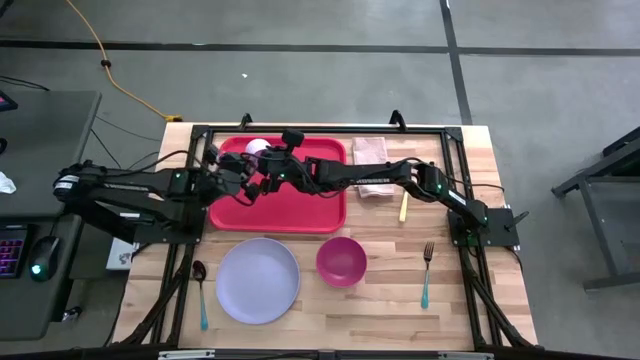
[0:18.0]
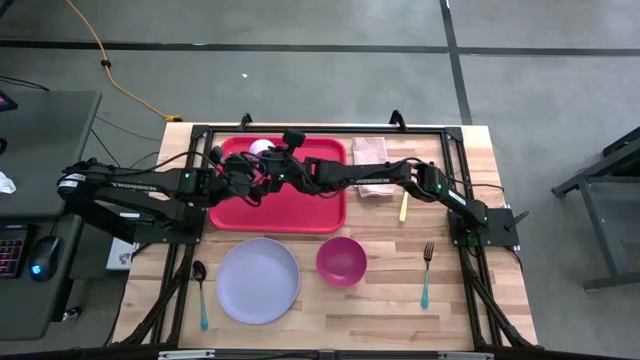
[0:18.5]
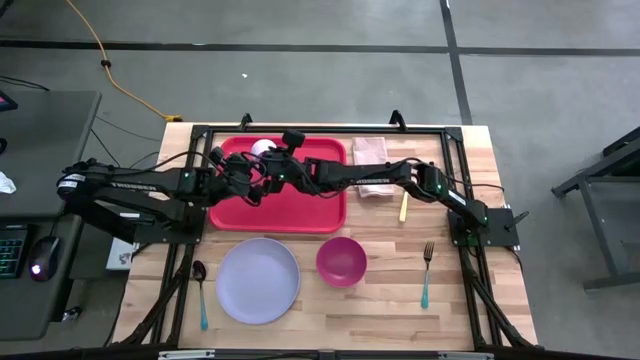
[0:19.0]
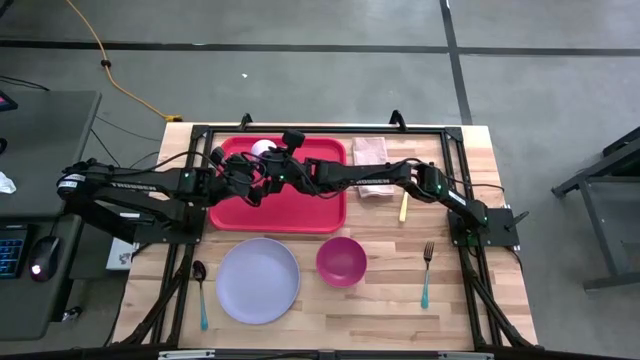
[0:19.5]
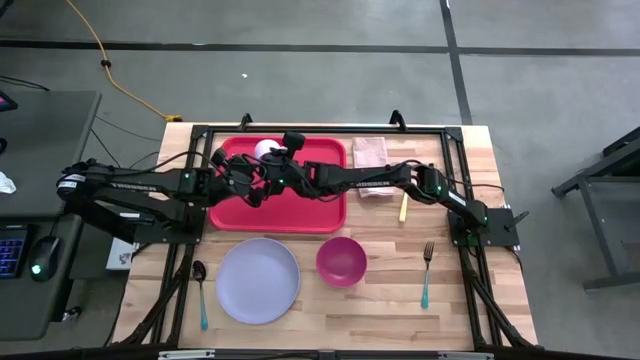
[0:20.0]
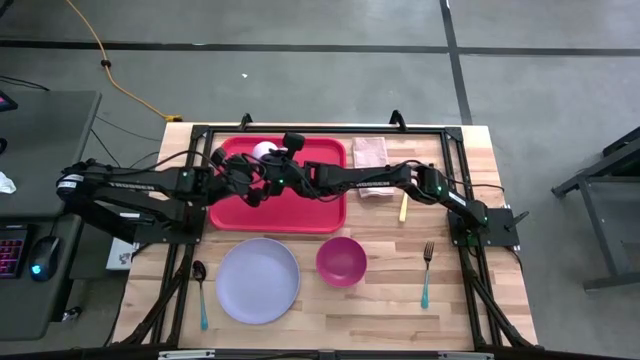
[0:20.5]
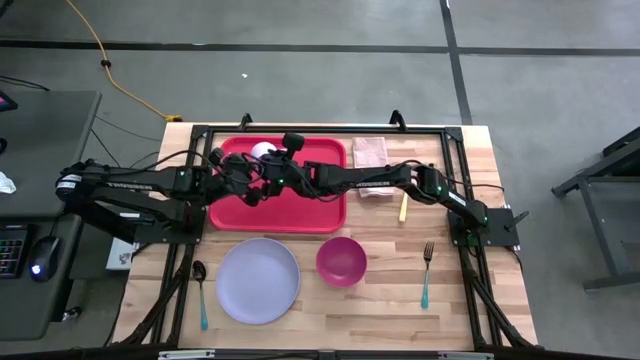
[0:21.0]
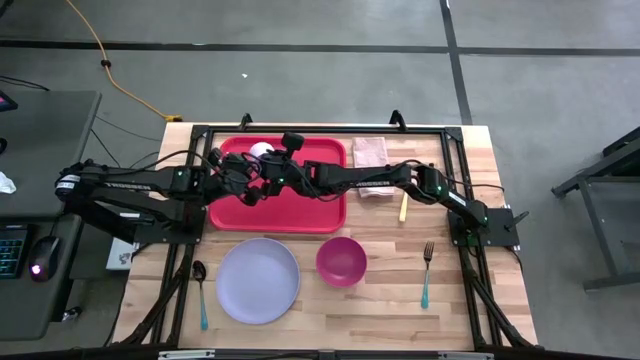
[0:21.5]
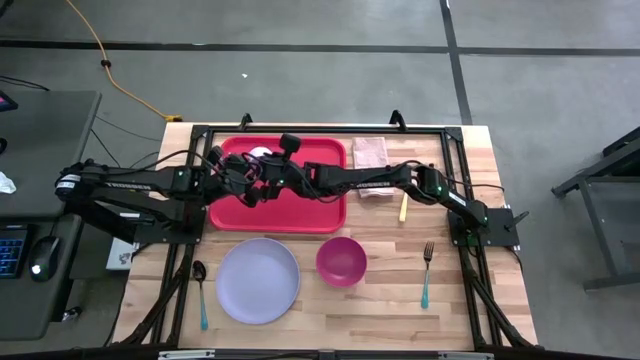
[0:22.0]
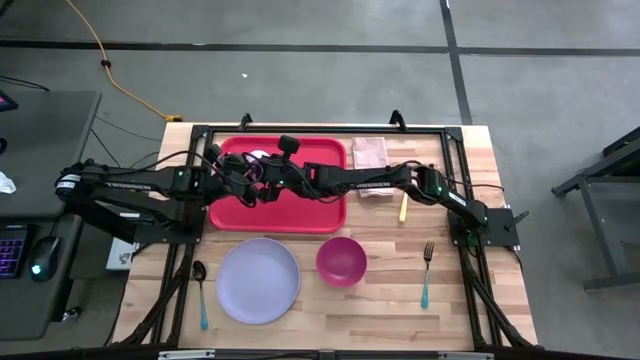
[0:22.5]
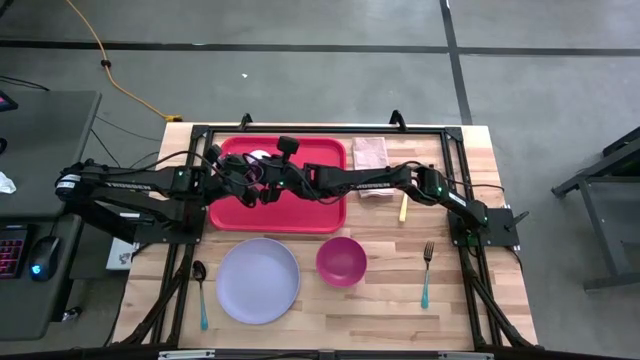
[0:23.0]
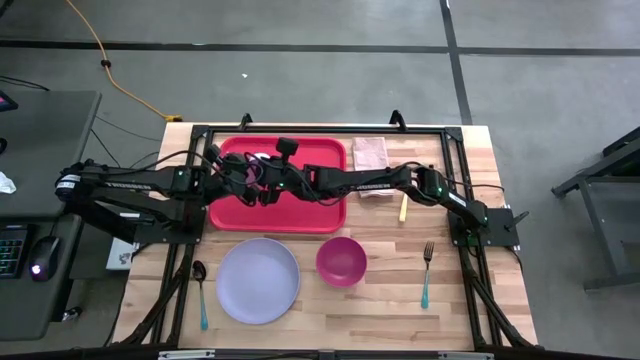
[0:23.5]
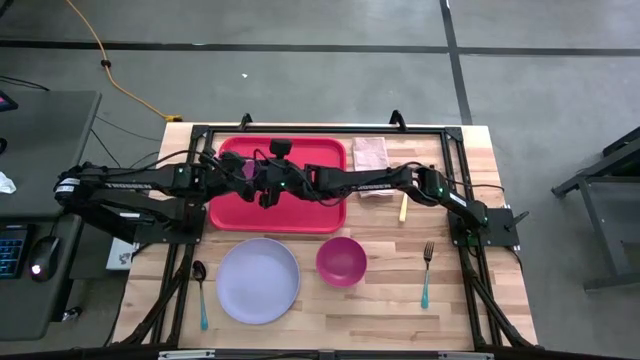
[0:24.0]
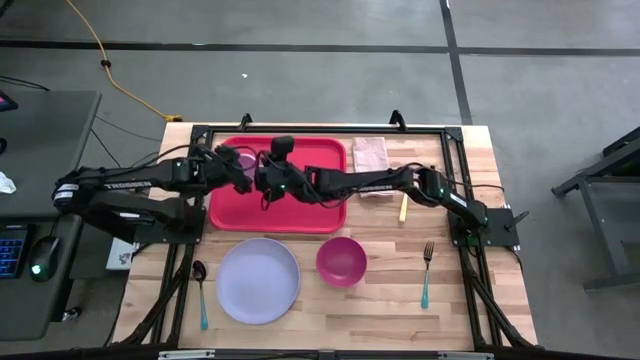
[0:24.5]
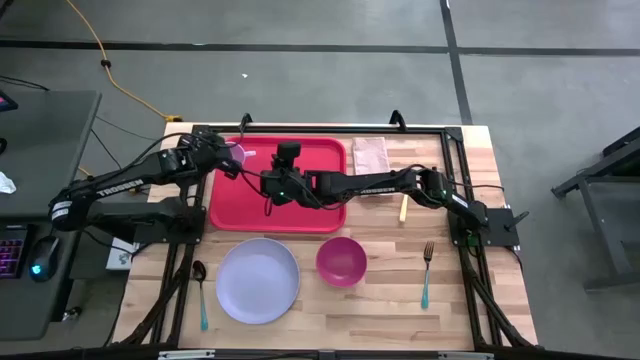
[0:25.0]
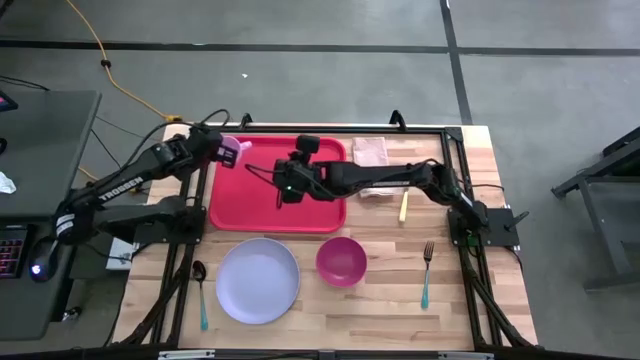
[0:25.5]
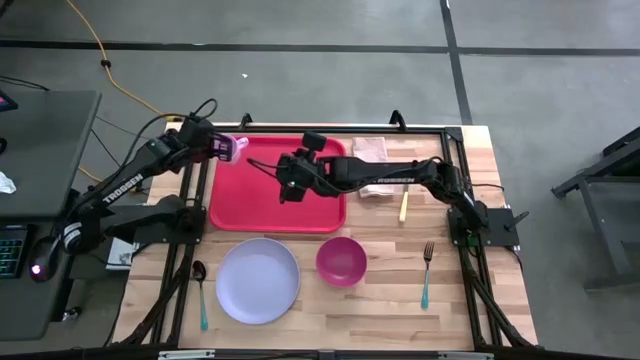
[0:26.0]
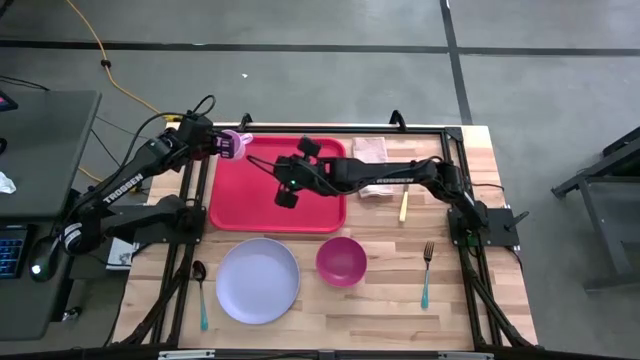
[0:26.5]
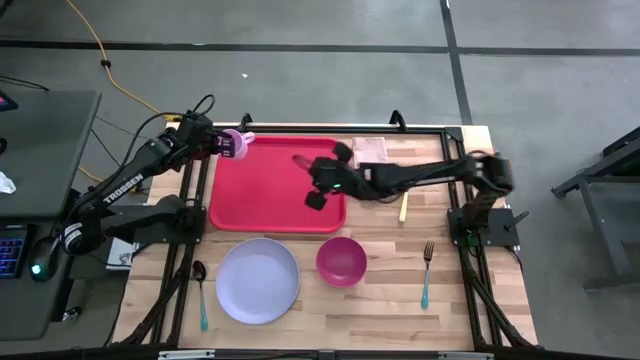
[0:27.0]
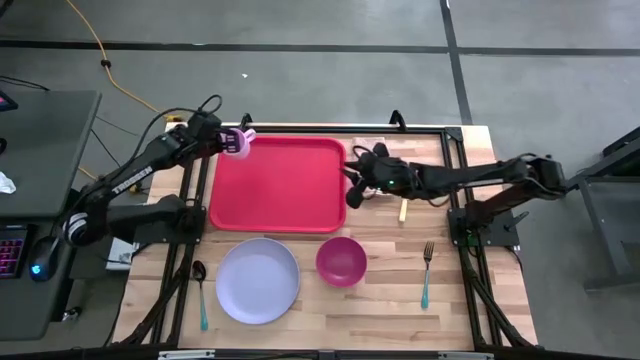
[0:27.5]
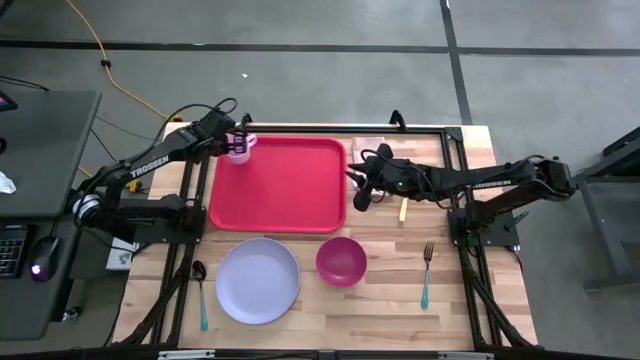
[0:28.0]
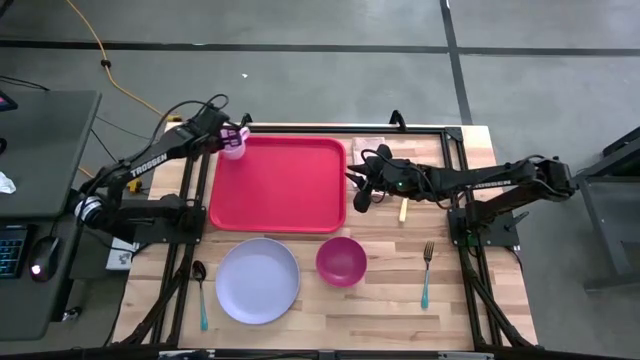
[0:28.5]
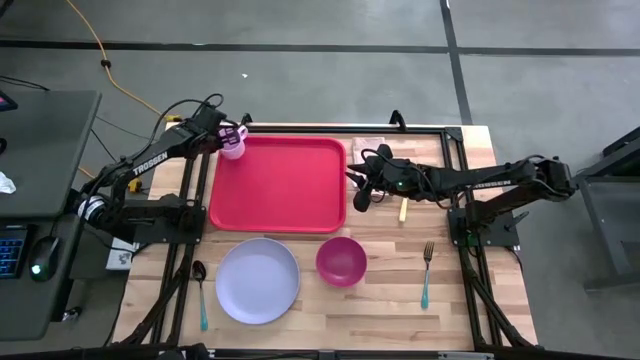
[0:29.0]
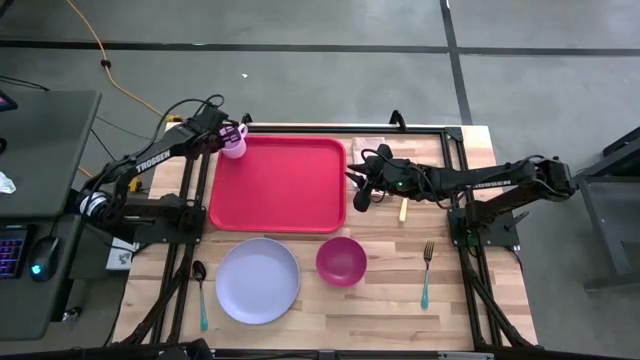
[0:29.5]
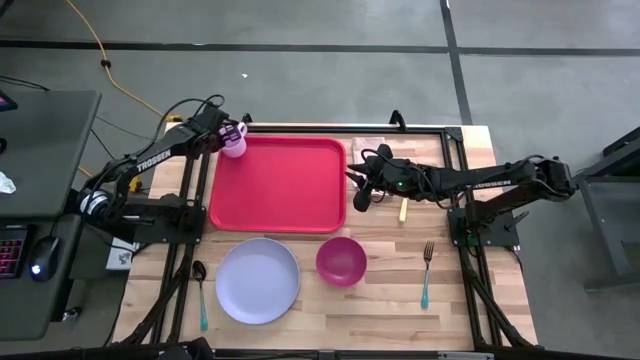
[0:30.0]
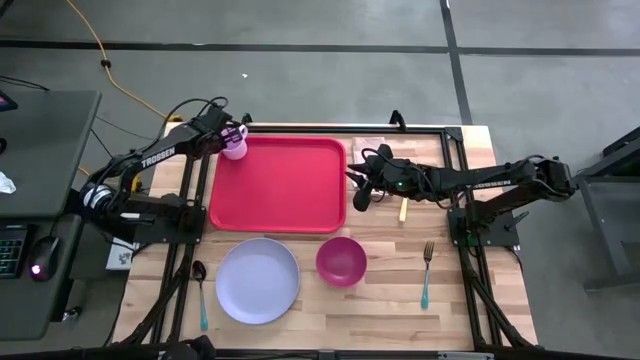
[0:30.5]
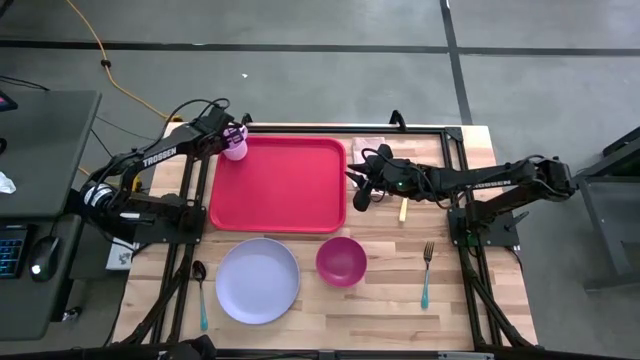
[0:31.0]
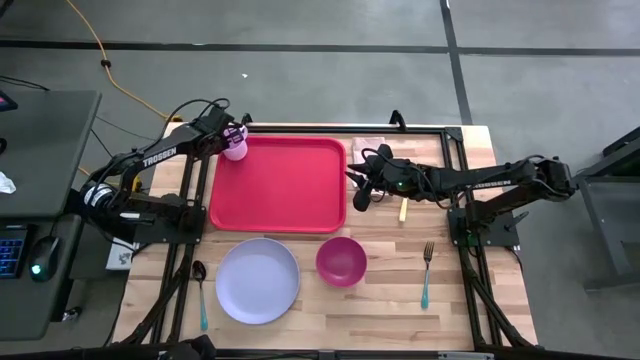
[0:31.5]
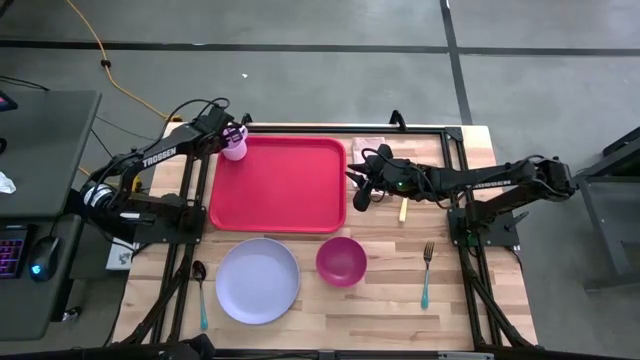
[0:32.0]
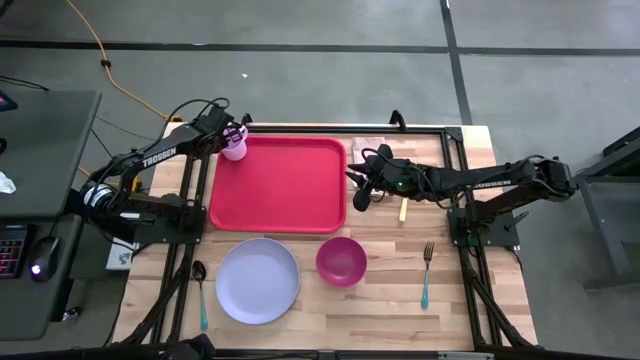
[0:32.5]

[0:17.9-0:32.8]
Task: Set up tray
Put the pink mug on the top left of the red serving tray

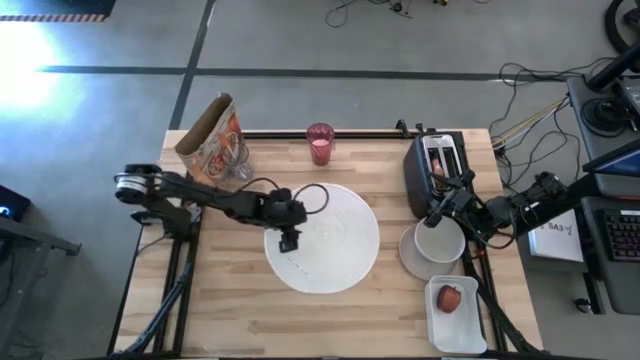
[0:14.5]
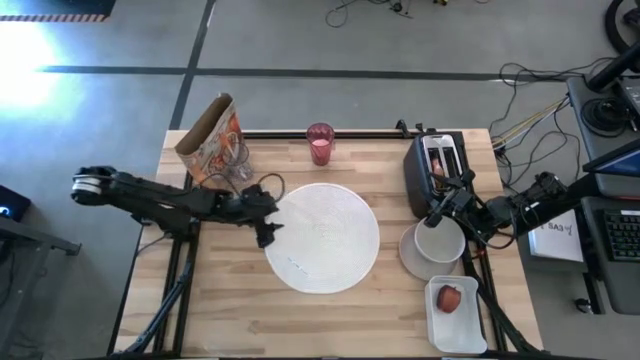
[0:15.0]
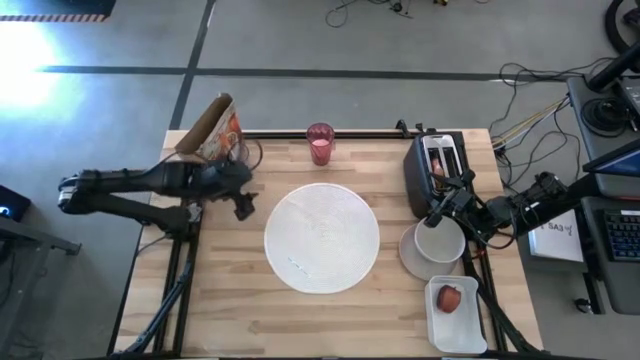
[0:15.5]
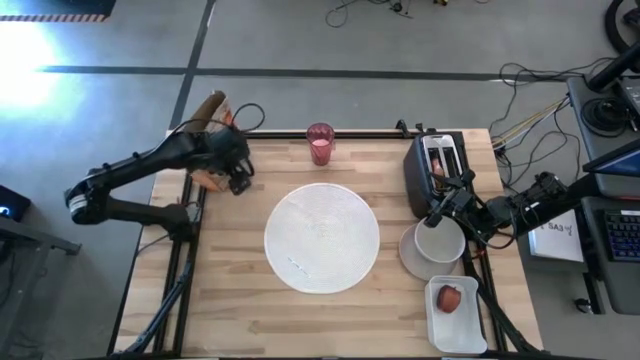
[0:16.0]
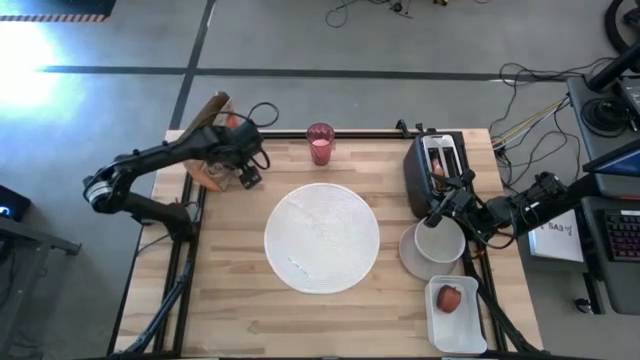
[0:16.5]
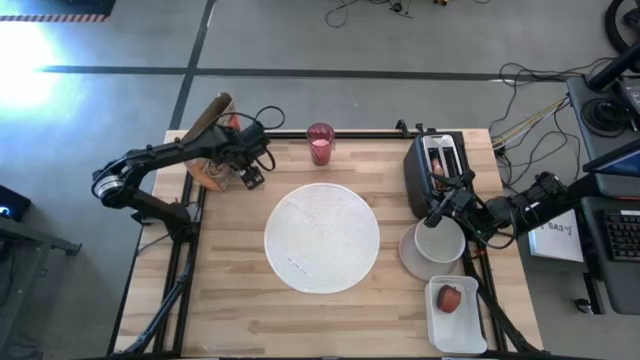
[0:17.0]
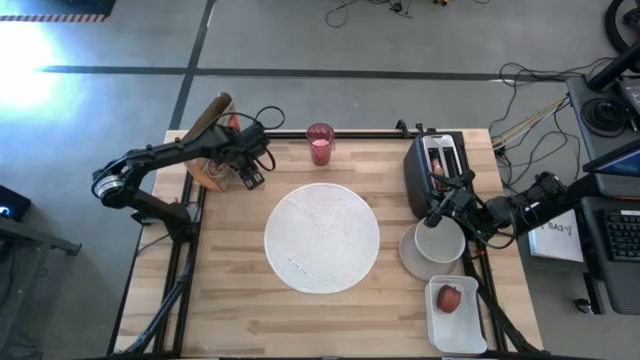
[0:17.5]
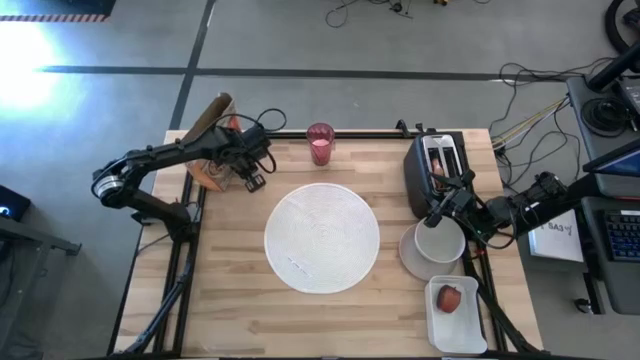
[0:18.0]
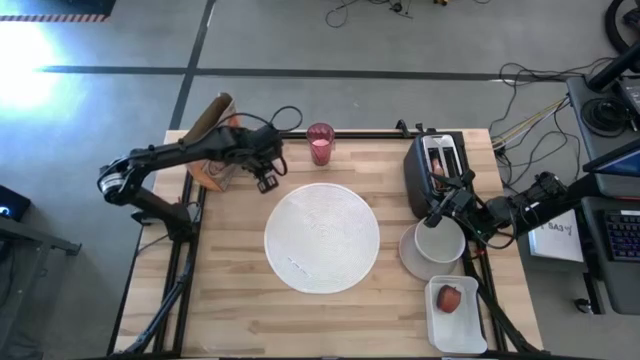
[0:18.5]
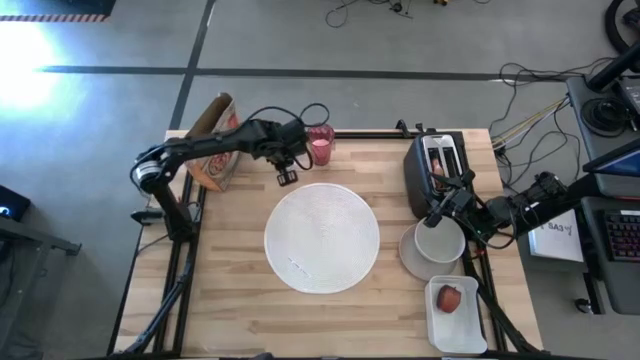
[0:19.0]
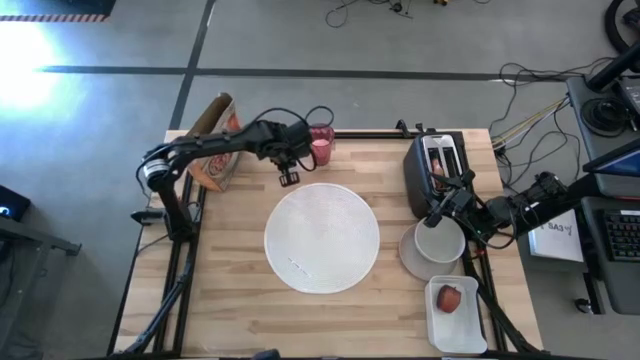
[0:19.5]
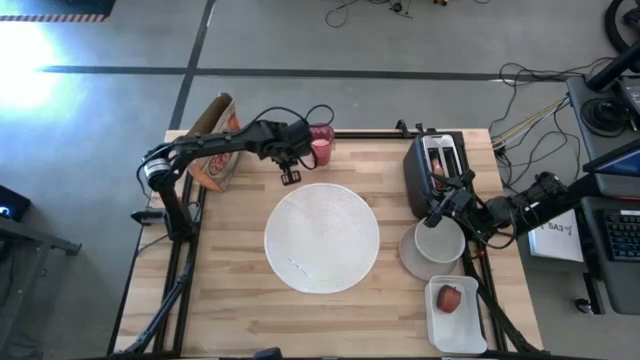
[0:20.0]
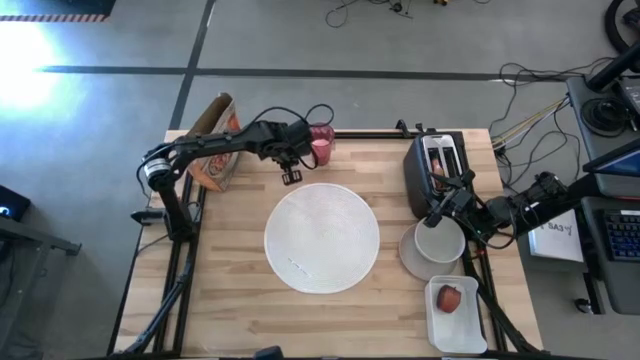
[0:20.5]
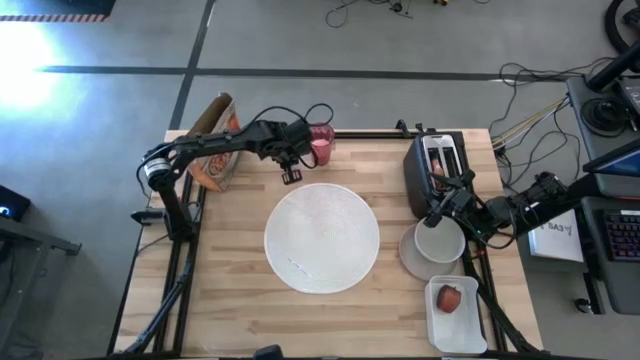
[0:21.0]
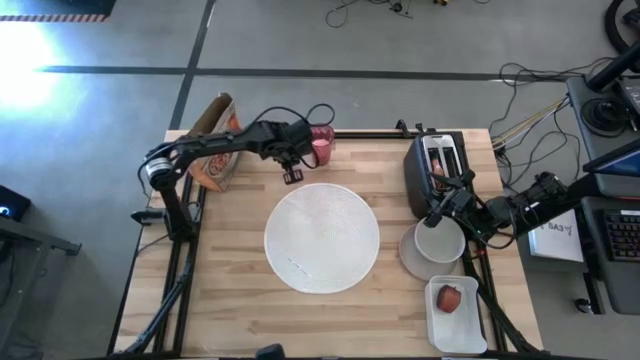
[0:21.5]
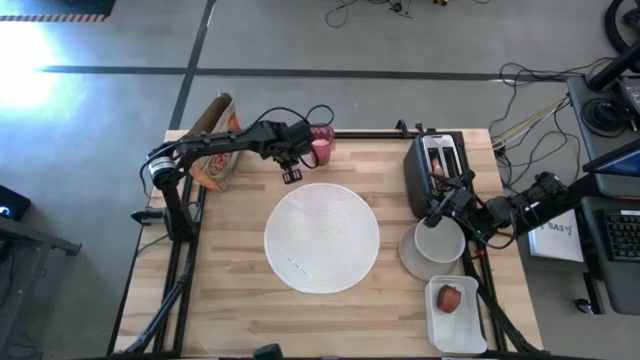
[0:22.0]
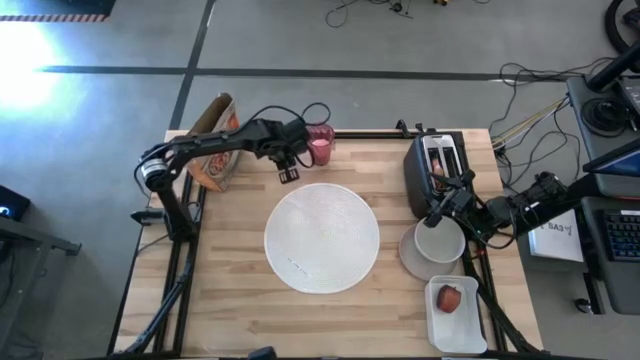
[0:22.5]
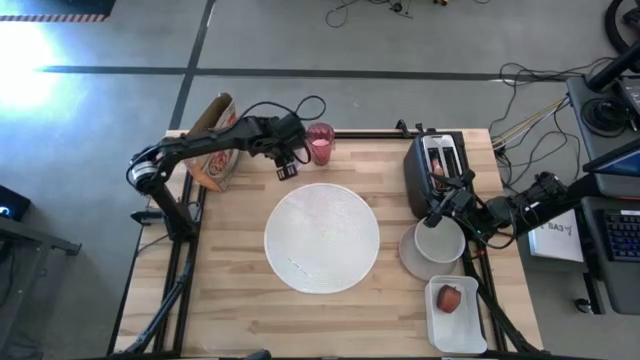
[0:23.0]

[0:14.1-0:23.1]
Task: Arrange a breakfast setting
Move the transparent cup to the middle top
